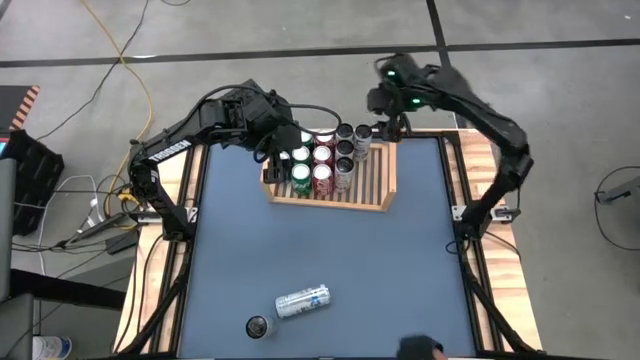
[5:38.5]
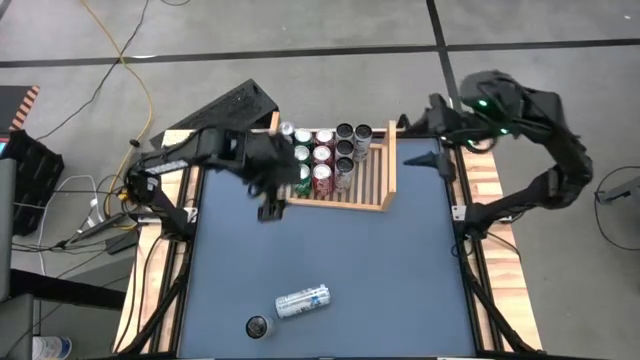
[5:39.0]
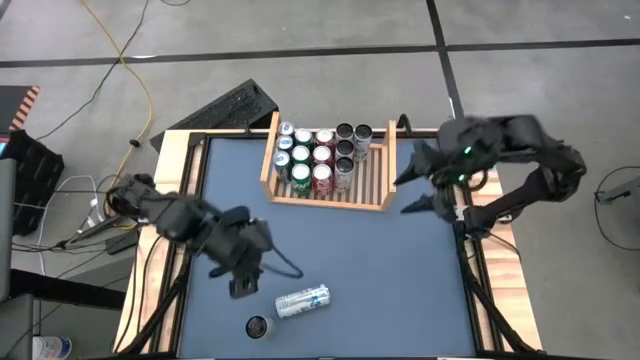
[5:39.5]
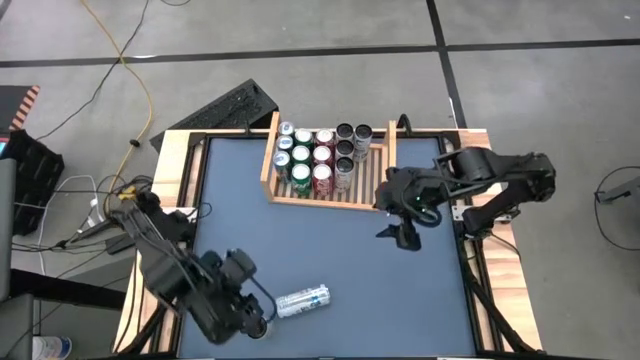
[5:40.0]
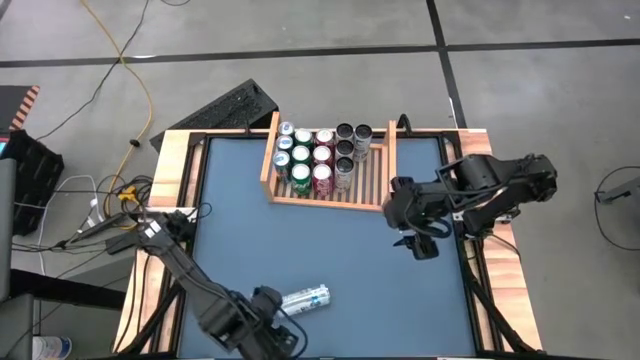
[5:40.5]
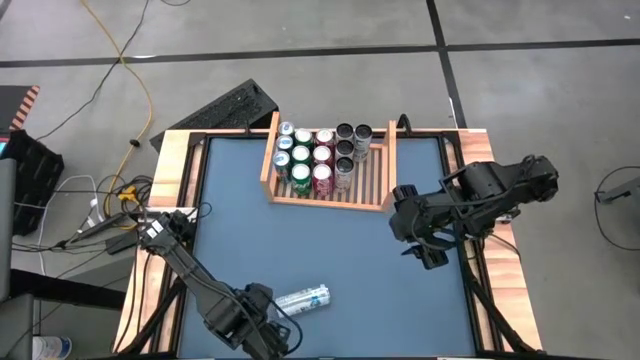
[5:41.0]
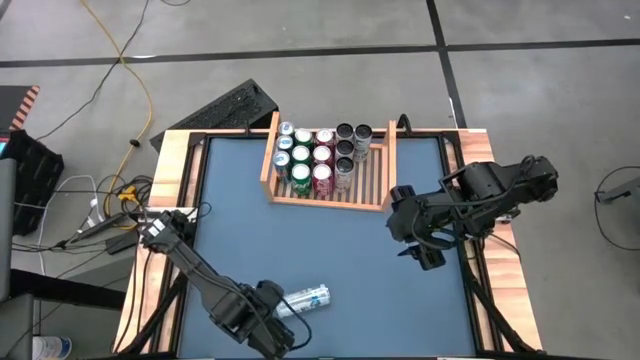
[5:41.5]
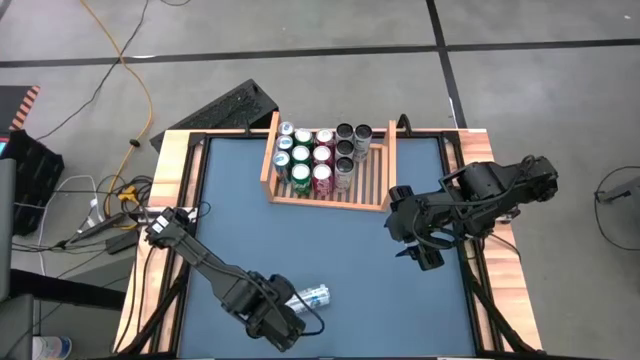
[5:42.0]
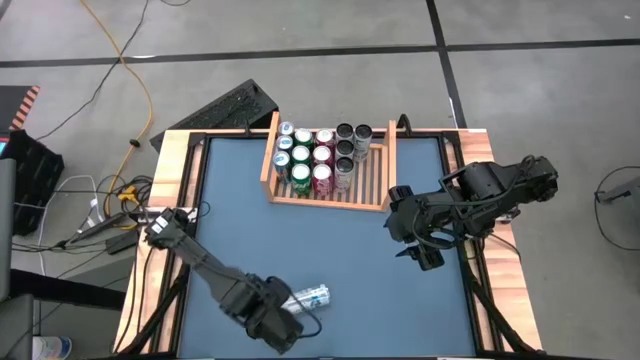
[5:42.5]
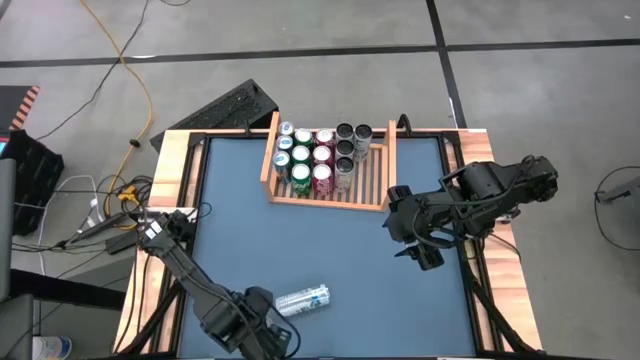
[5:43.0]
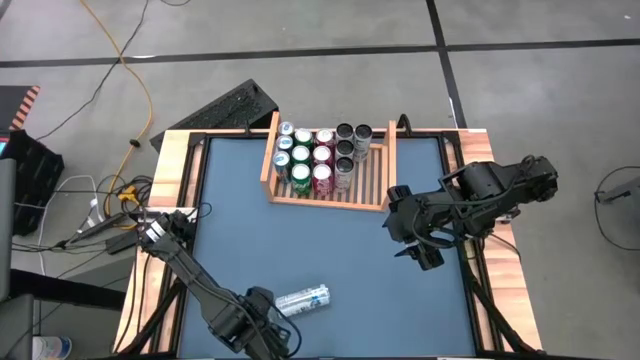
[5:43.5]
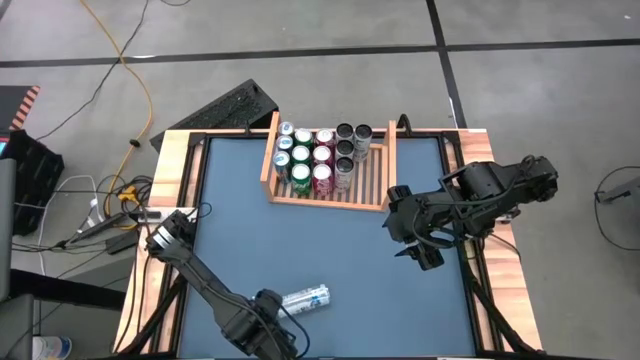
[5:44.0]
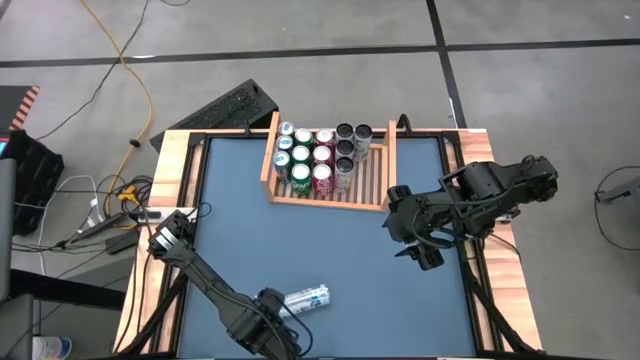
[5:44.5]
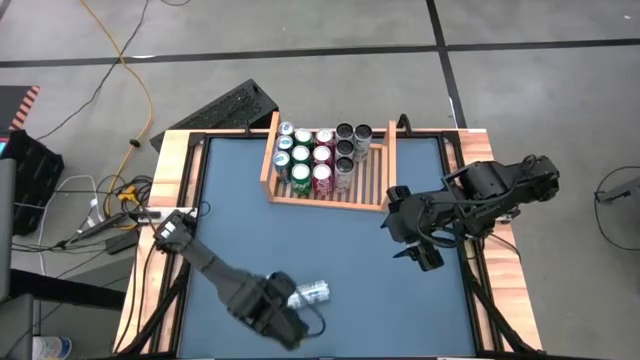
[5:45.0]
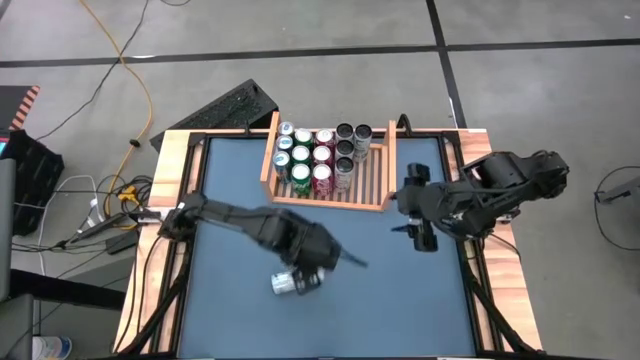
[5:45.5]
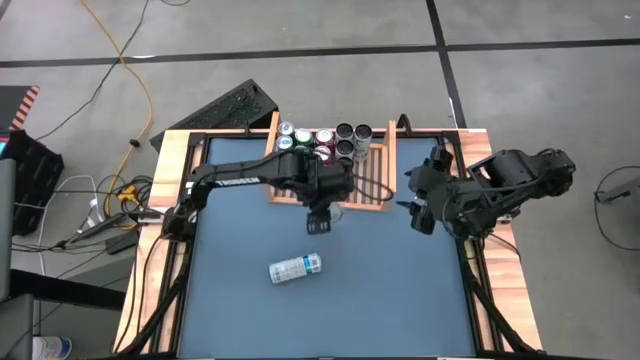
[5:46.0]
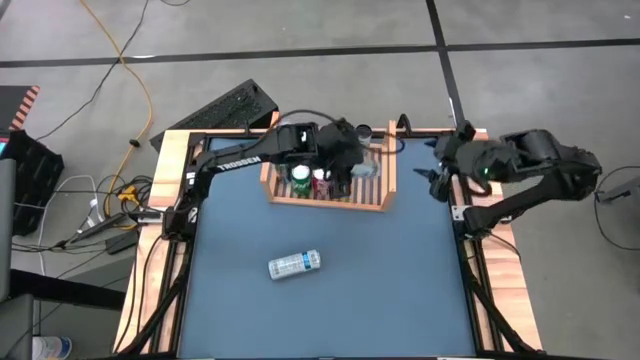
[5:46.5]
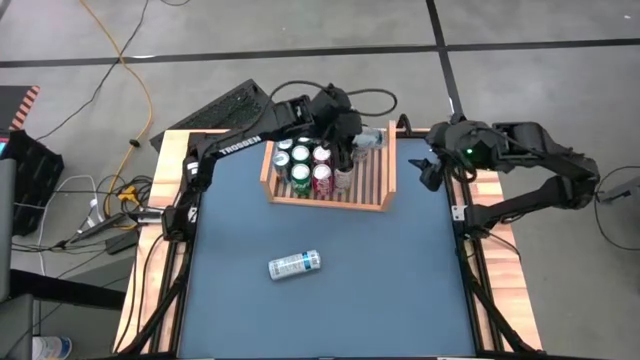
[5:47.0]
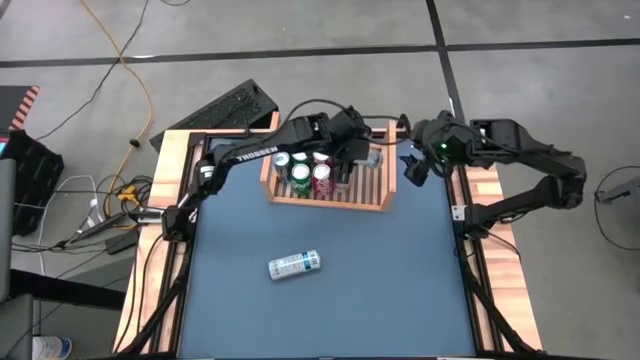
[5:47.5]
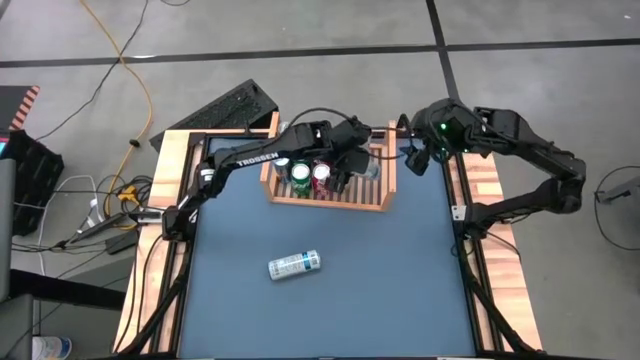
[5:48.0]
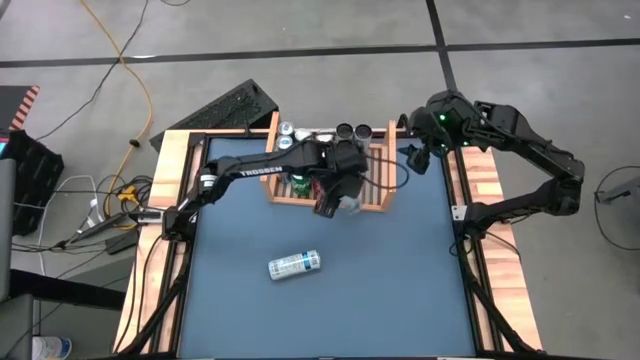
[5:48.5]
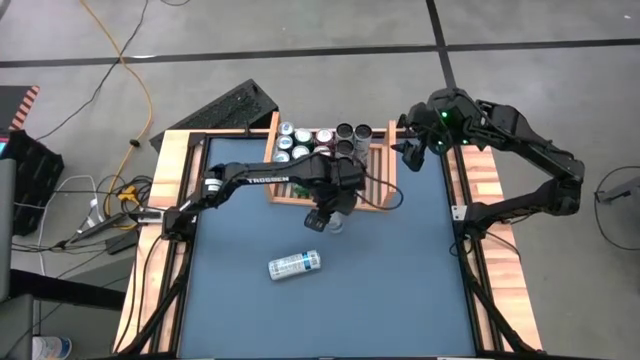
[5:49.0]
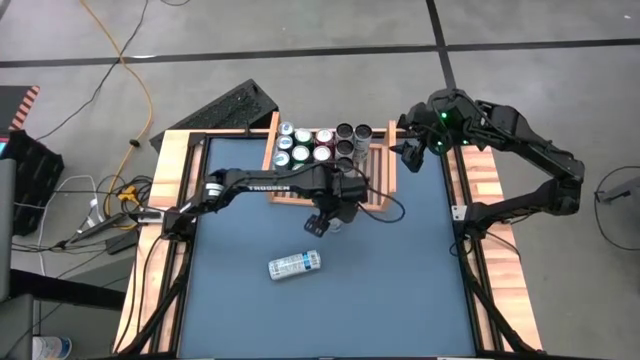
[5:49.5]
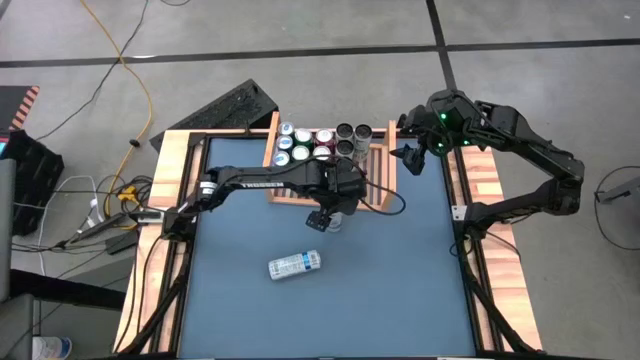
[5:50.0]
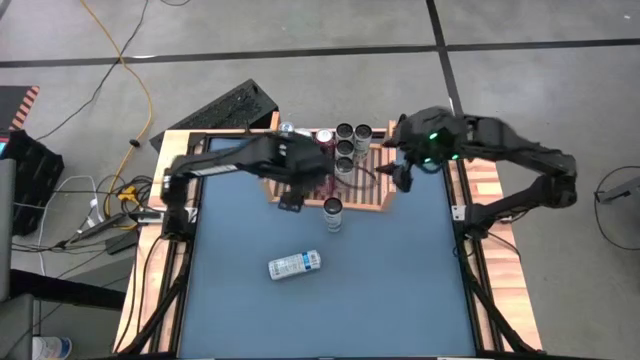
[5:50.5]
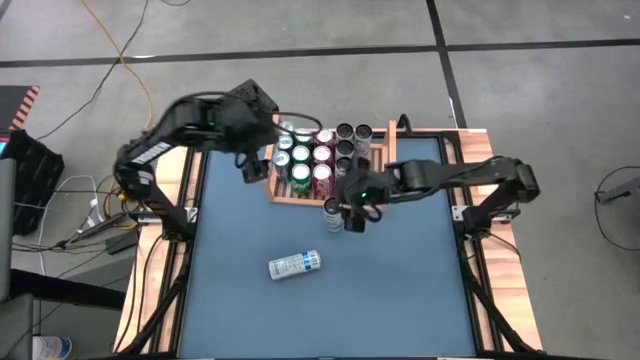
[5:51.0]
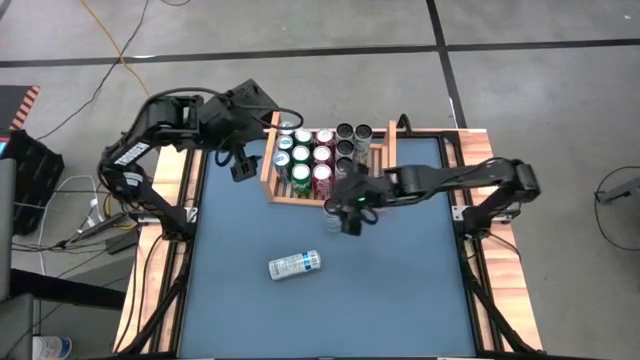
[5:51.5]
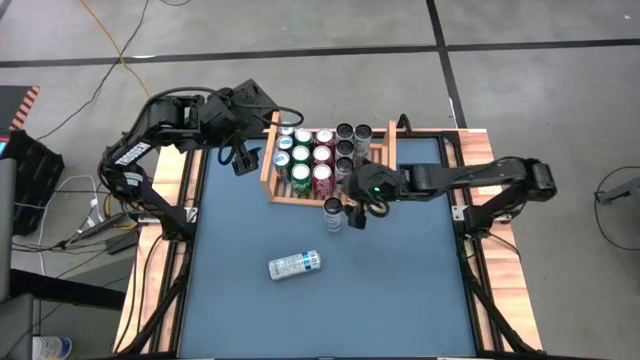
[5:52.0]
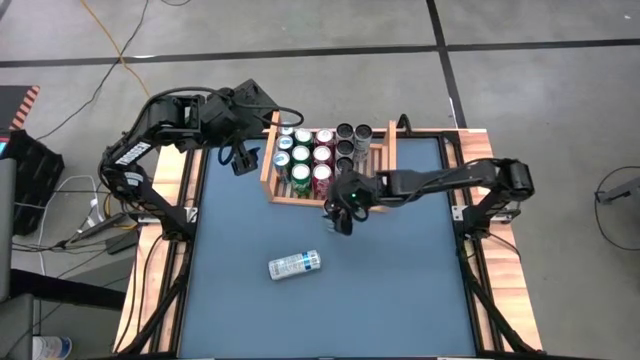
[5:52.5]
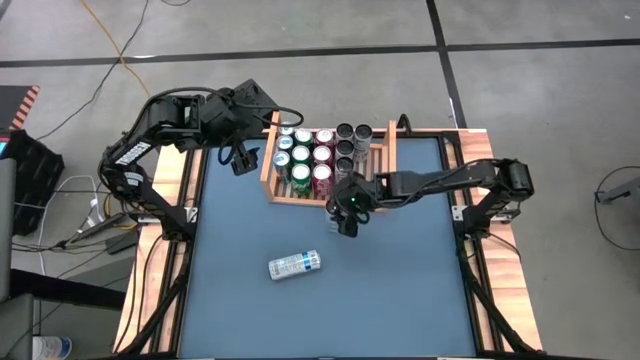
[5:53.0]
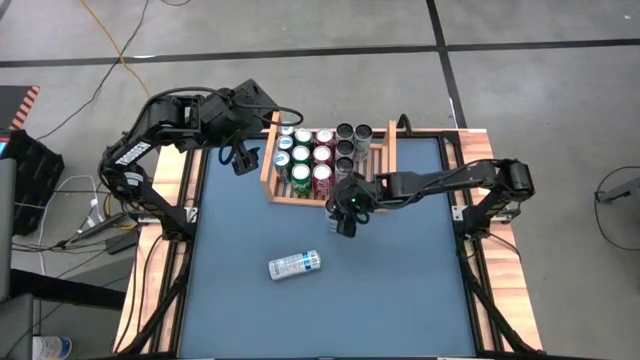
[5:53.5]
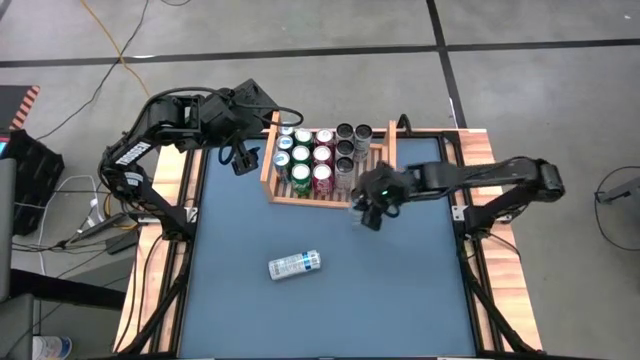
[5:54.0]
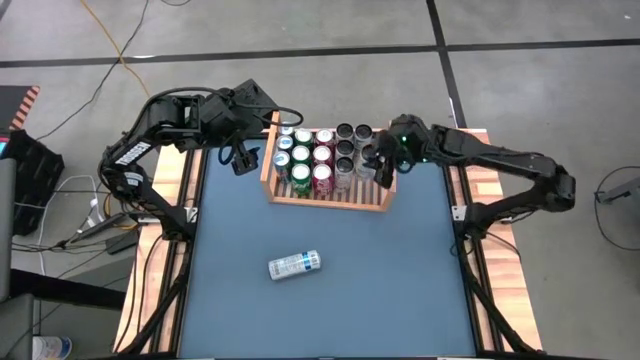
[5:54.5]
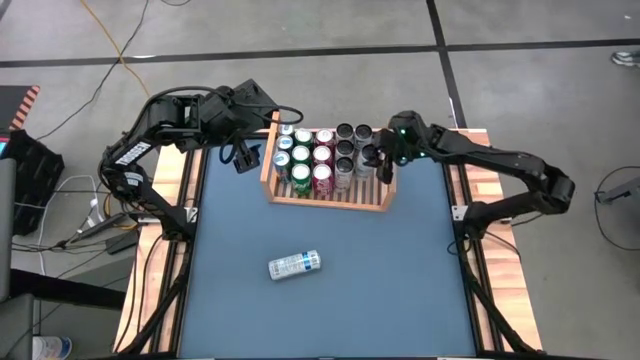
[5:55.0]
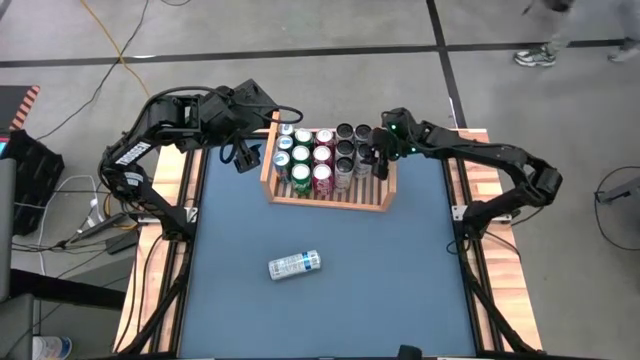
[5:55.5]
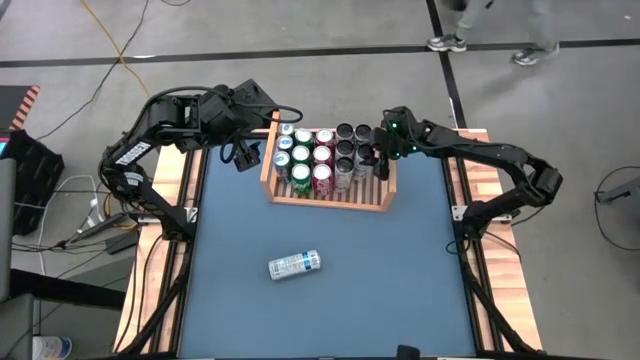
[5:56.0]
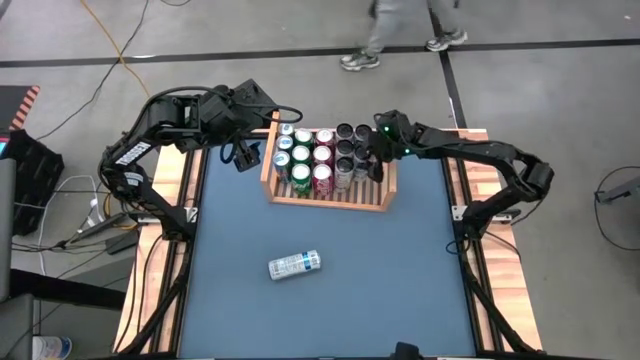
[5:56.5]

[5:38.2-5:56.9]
Task: Place canned beverage on shelf
Put the light blue soda can on the shelf

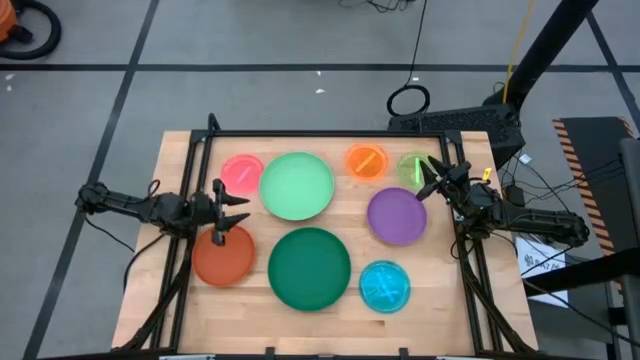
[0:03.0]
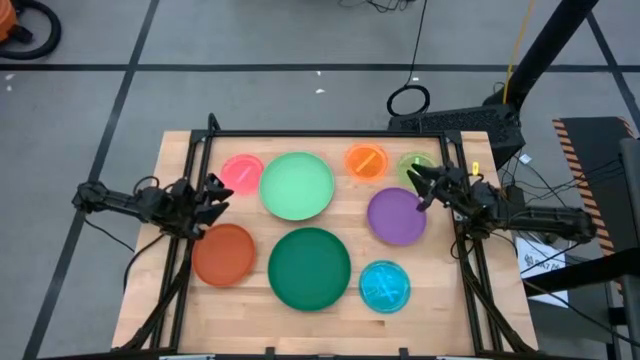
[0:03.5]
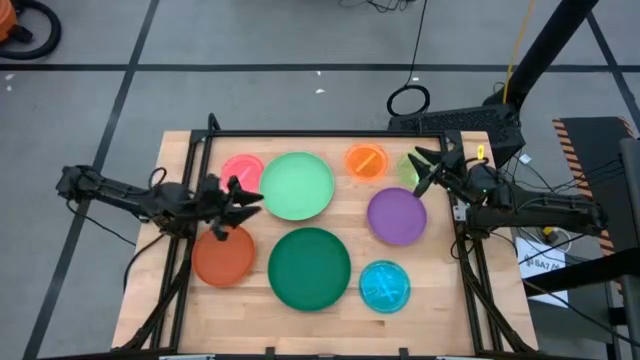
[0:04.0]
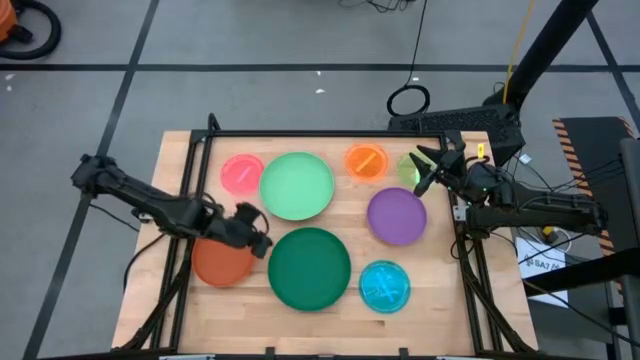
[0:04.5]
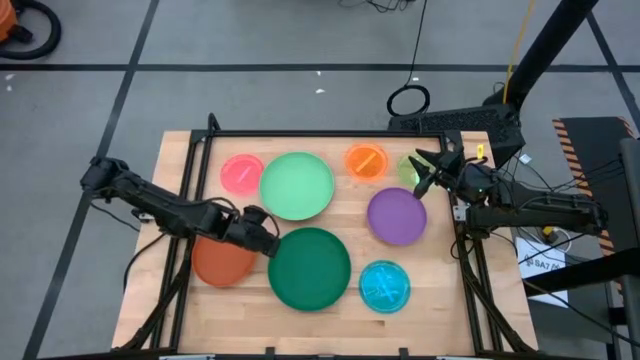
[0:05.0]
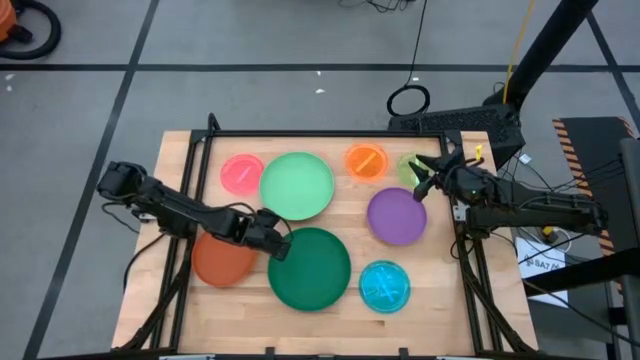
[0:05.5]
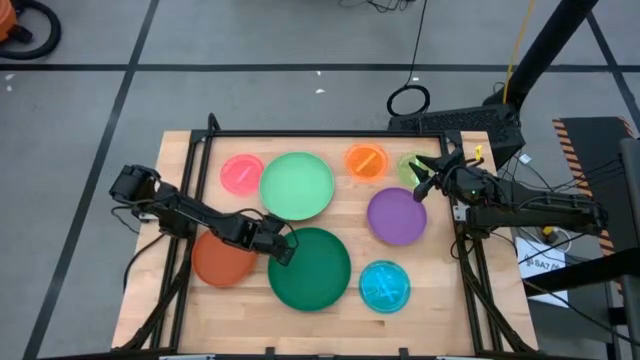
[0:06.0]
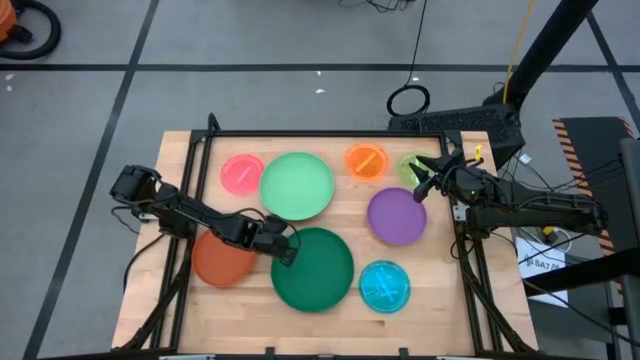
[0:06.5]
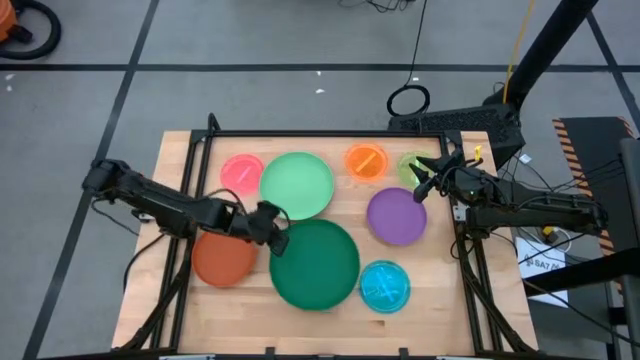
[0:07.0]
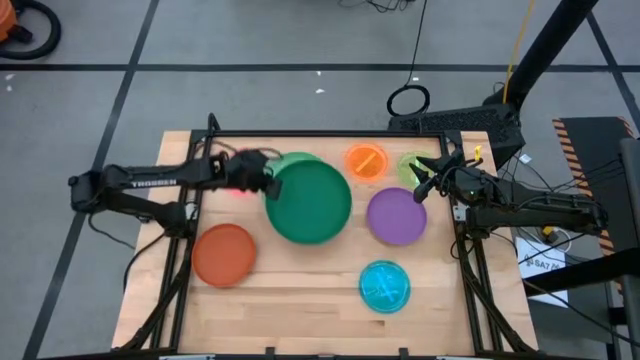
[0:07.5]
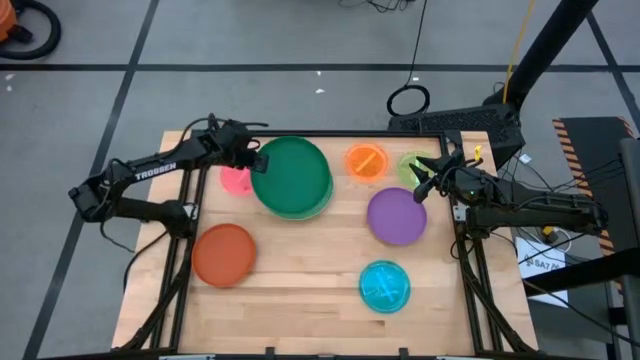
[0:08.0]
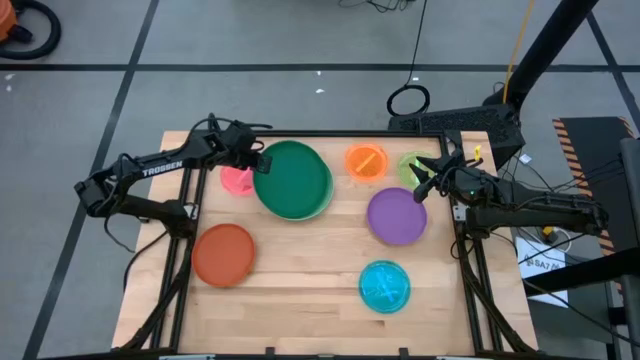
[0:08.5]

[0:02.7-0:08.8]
Task: Stack plastic plates
Stack the dark green plate on top of the green plate
